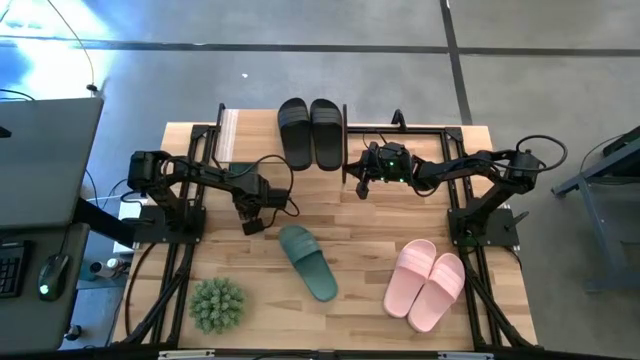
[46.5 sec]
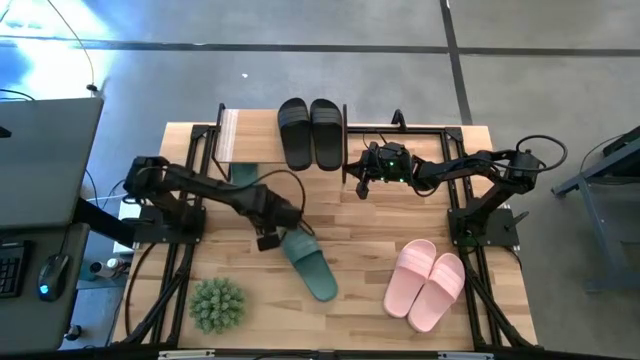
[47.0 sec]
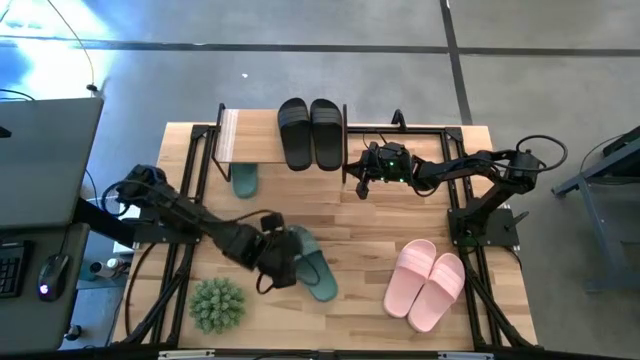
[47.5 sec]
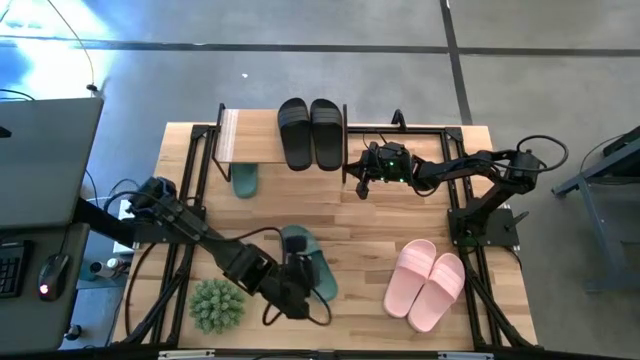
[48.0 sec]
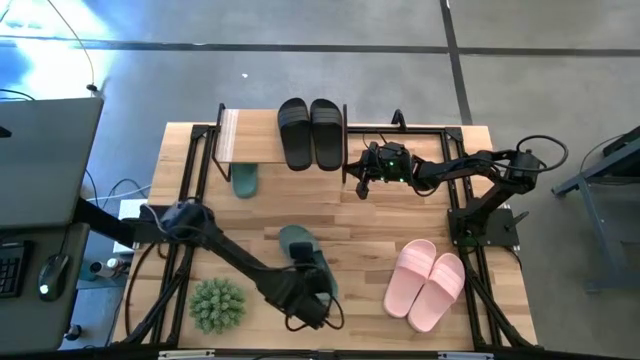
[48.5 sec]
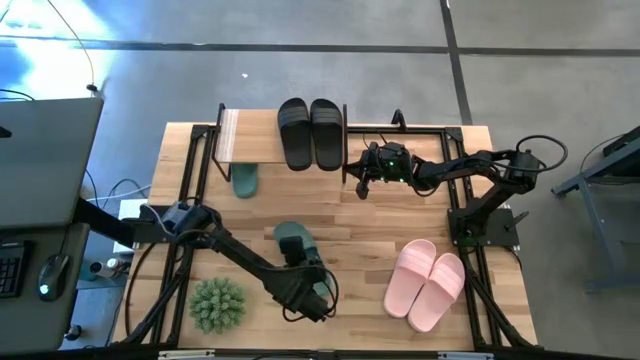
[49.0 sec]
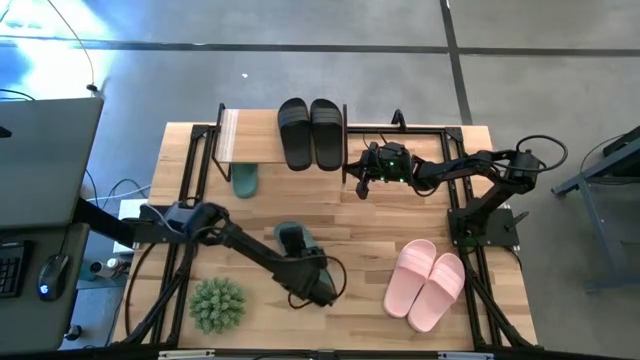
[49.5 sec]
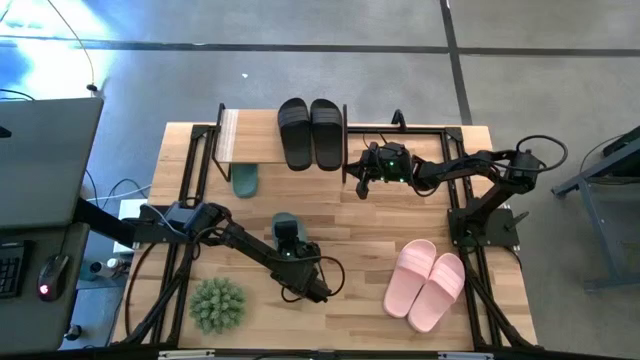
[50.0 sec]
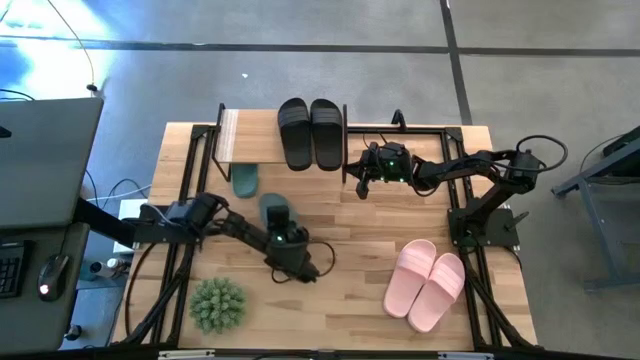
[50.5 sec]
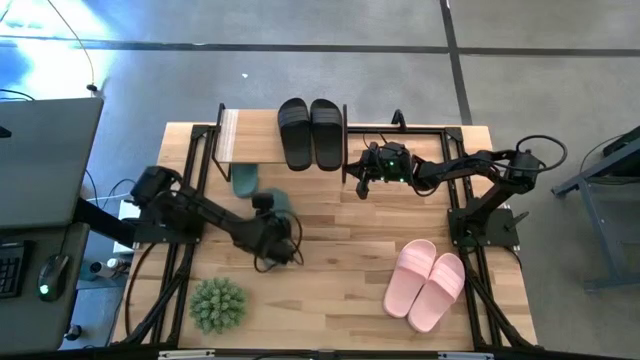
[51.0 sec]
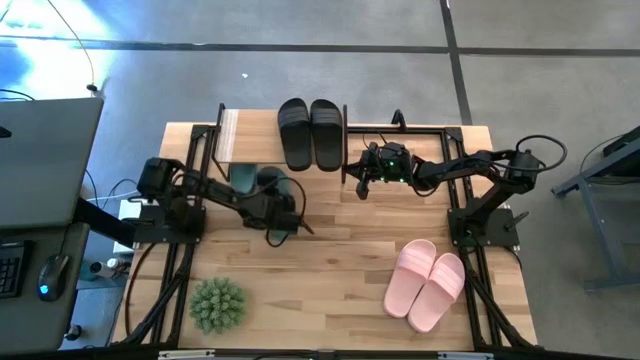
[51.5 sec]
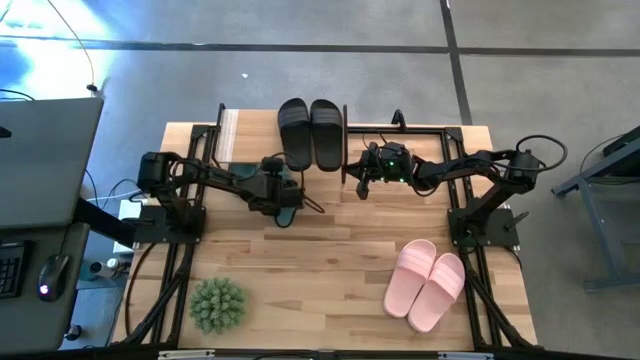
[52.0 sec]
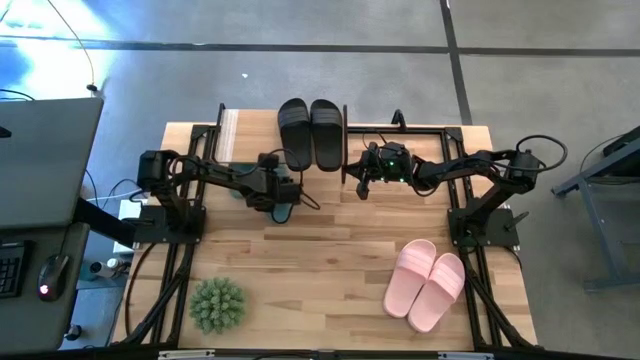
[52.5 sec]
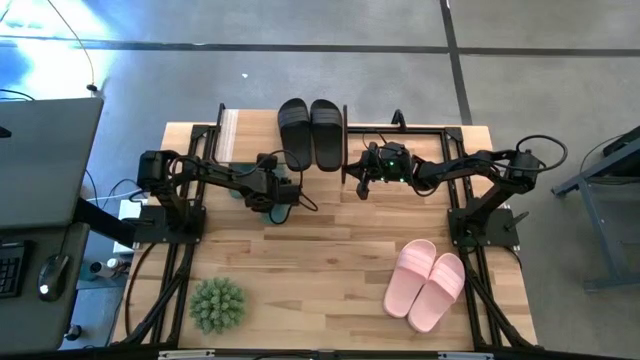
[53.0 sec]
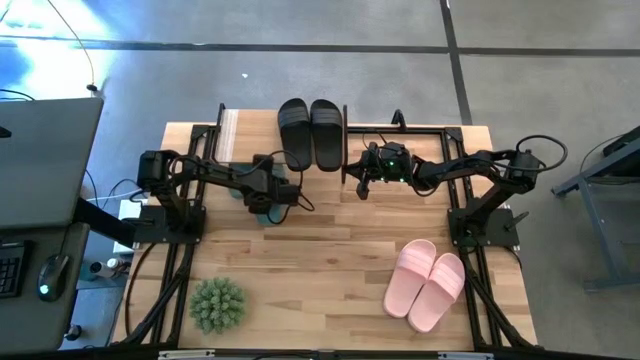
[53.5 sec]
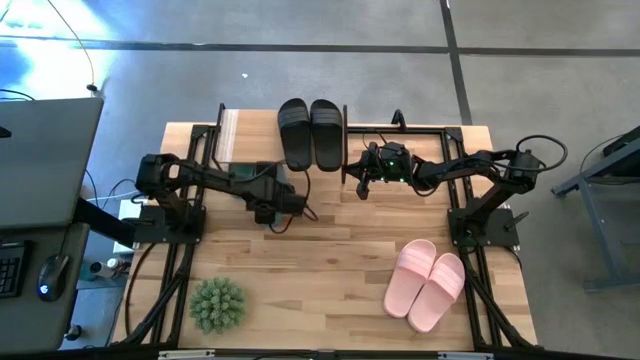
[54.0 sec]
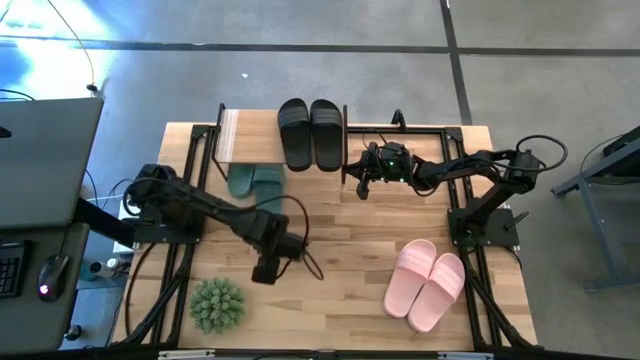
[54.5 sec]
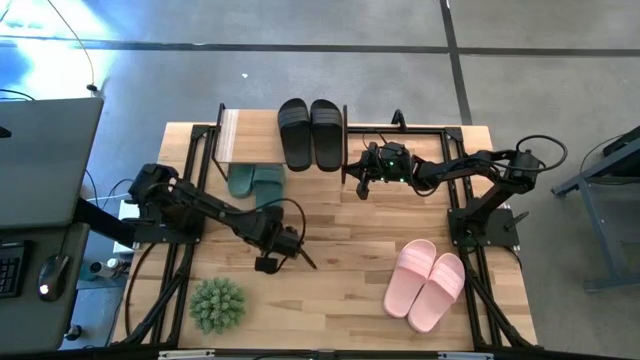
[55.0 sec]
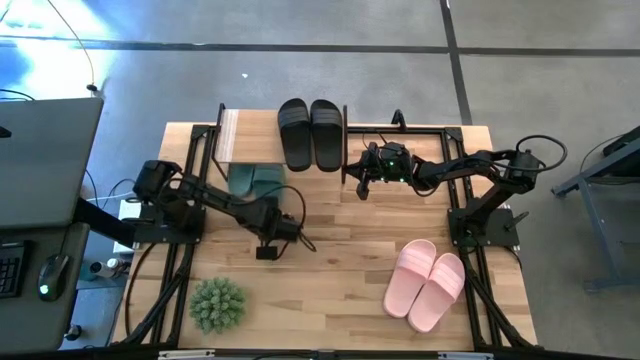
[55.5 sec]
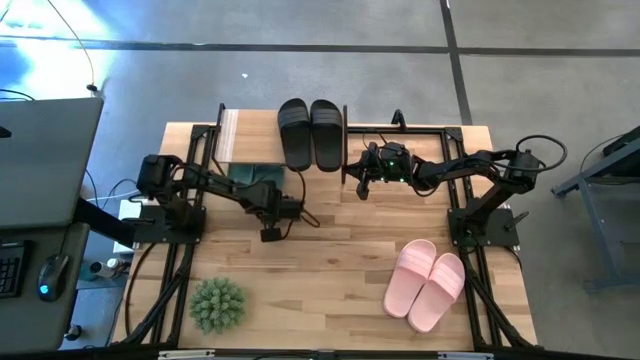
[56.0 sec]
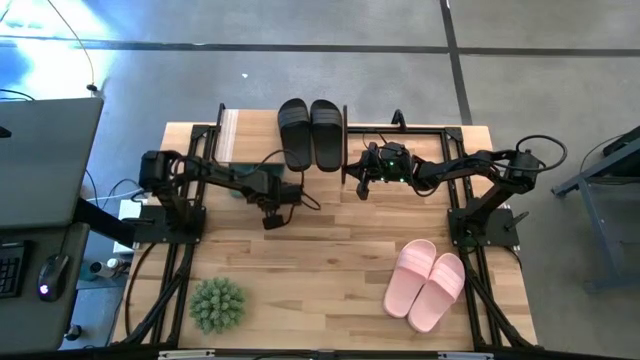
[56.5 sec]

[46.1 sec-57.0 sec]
Task: Pick and place slides into the shelf
Put the green slide under the shelf
